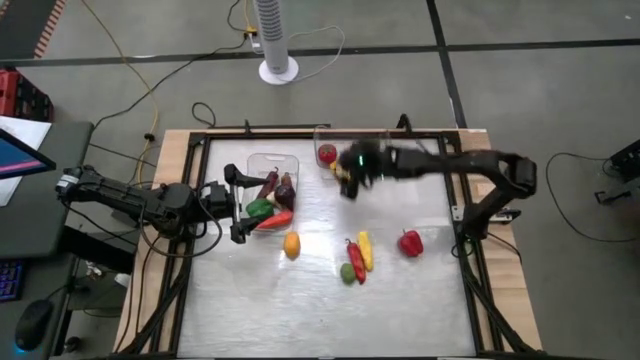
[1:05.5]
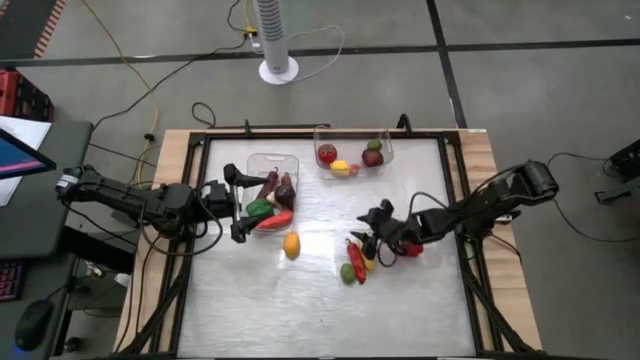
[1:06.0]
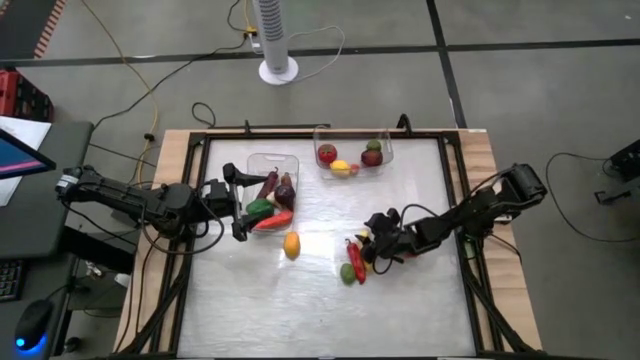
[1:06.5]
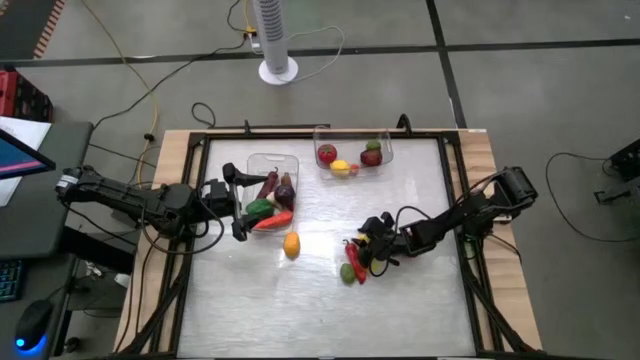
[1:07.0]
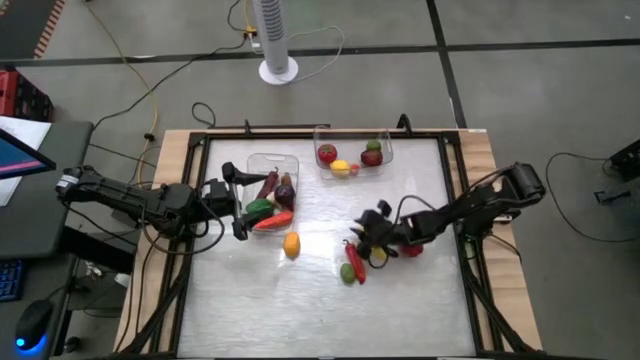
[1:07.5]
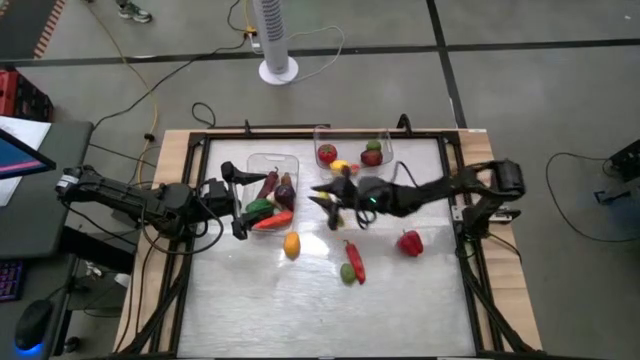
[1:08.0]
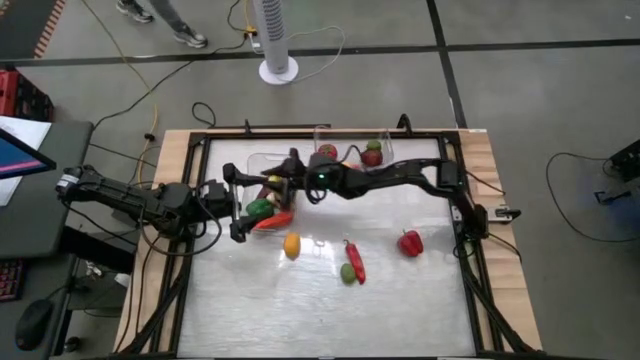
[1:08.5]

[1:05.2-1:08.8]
Task: Sort produce into baskets
Put the yellow corn into the left transparent bin

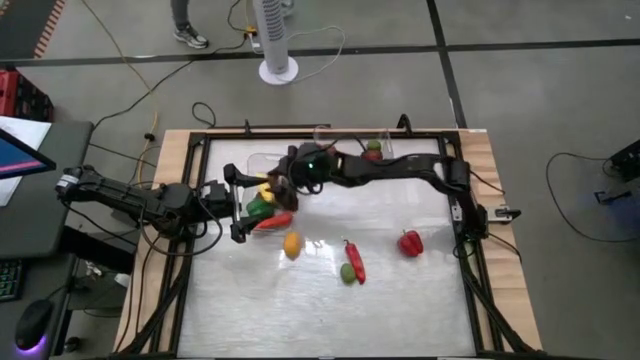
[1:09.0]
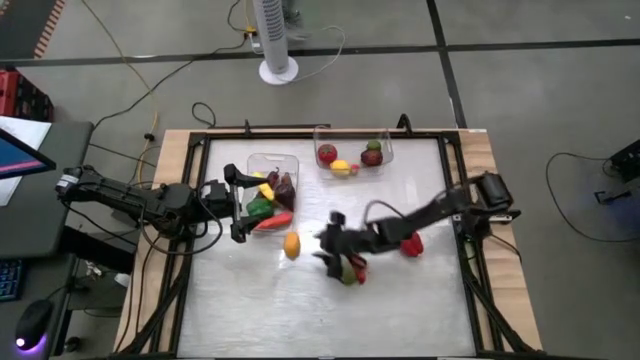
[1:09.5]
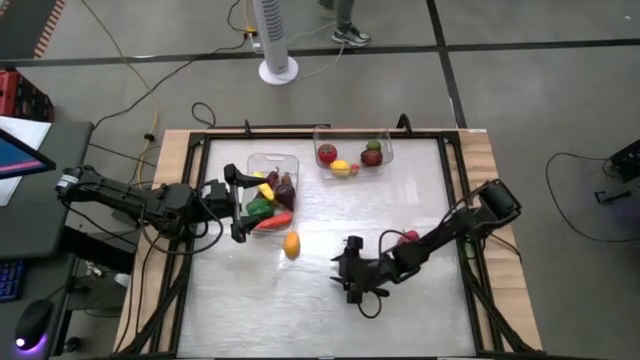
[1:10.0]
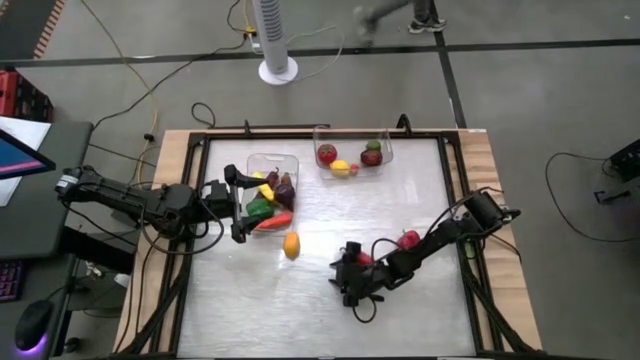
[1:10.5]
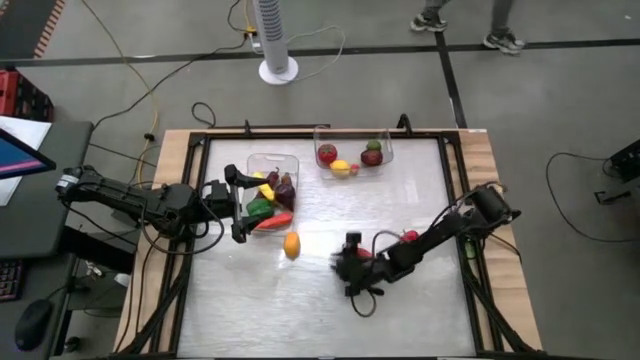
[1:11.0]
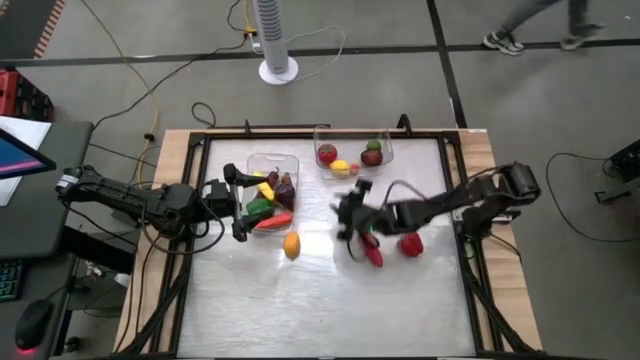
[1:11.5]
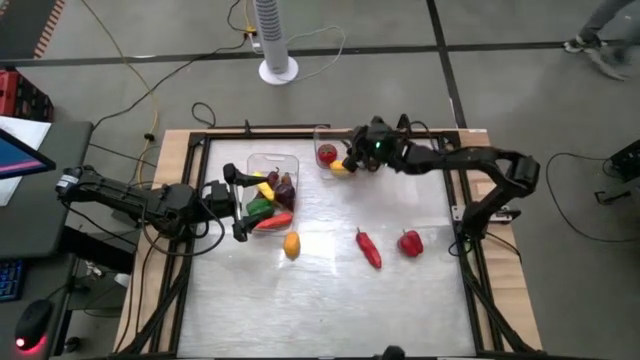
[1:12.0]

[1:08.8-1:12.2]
Put the green lime into the right transparent bin

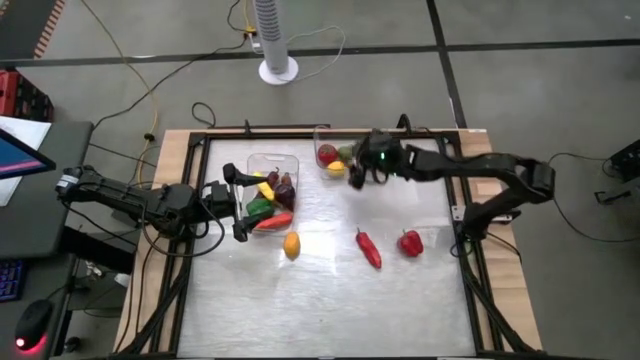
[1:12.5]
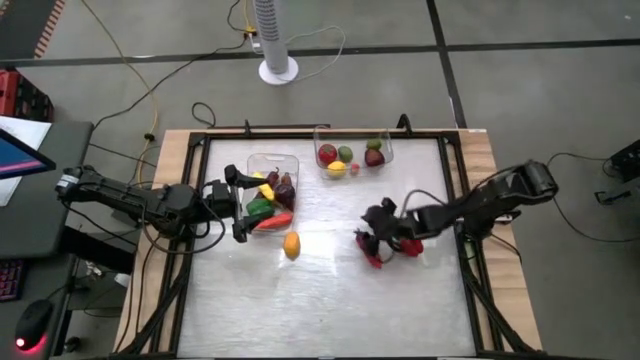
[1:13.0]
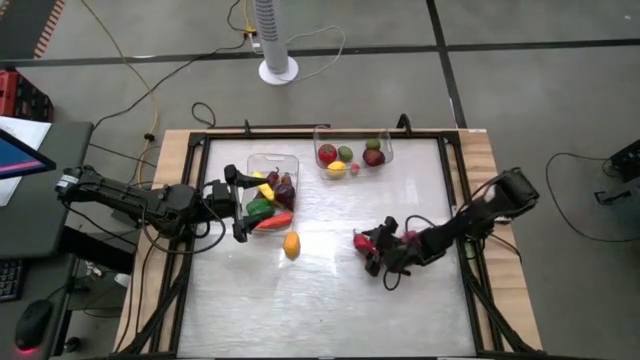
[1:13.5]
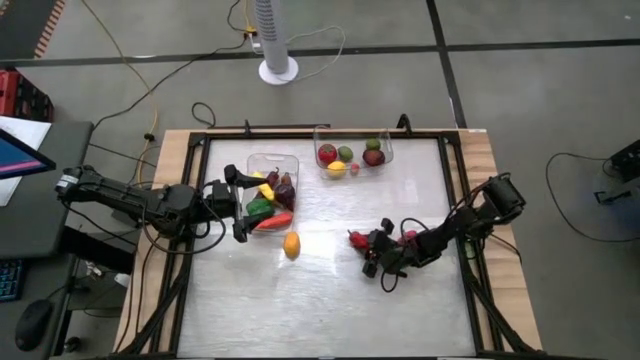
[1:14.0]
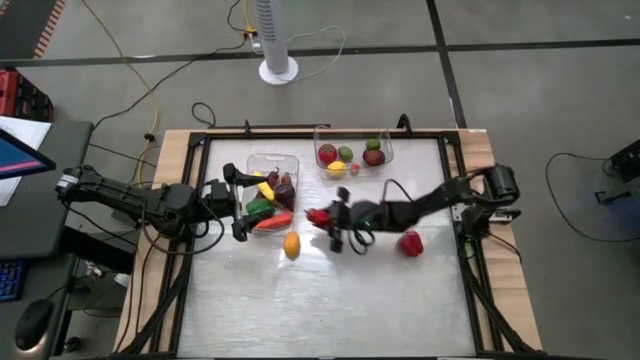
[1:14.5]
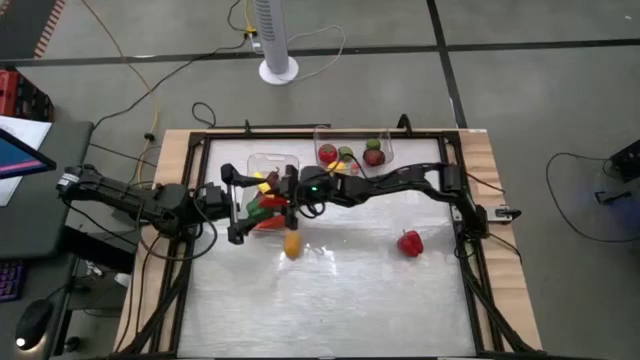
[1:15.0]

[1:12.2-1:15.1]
Put the red chili pepper into the left transparent bin

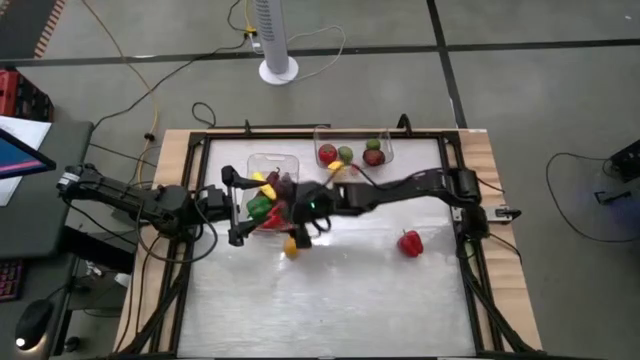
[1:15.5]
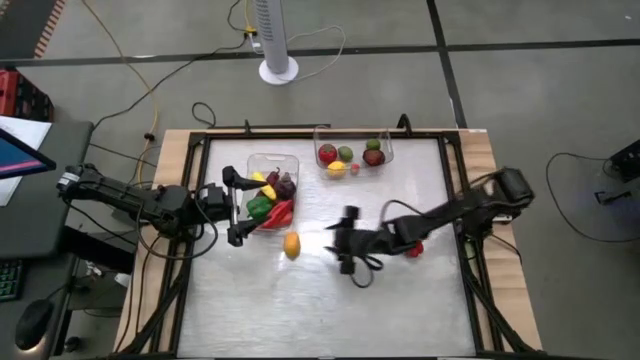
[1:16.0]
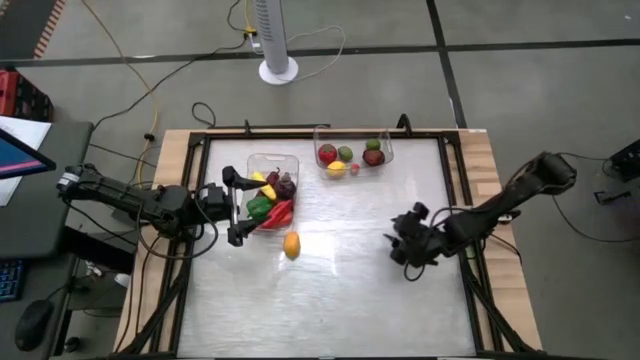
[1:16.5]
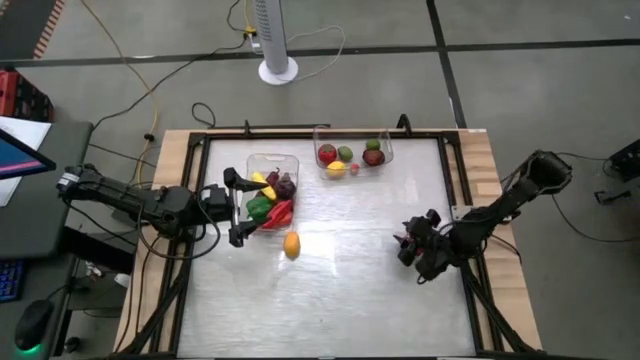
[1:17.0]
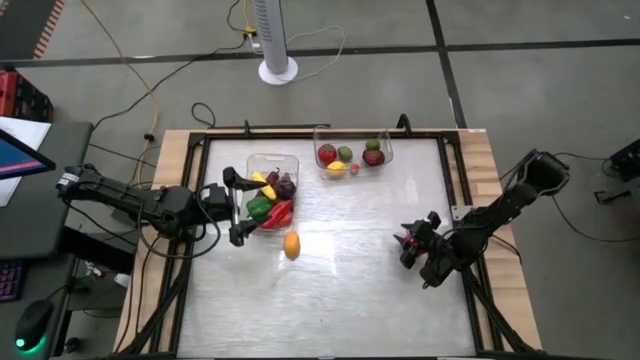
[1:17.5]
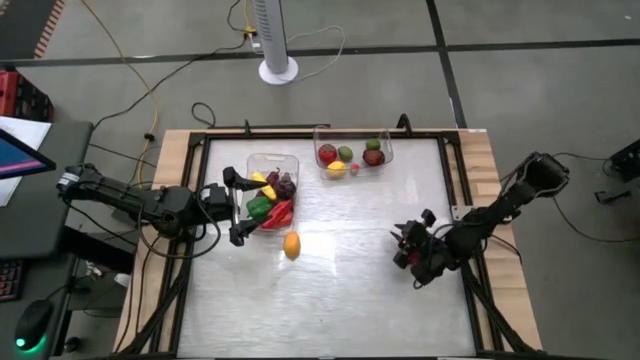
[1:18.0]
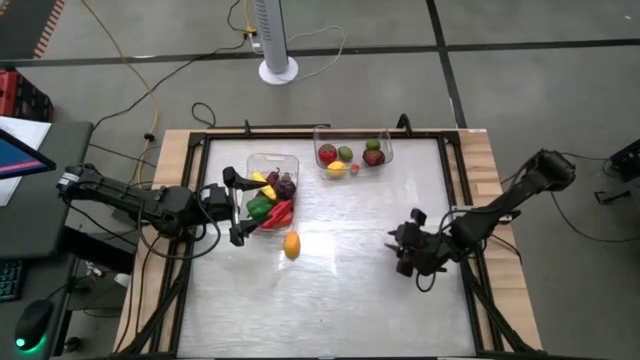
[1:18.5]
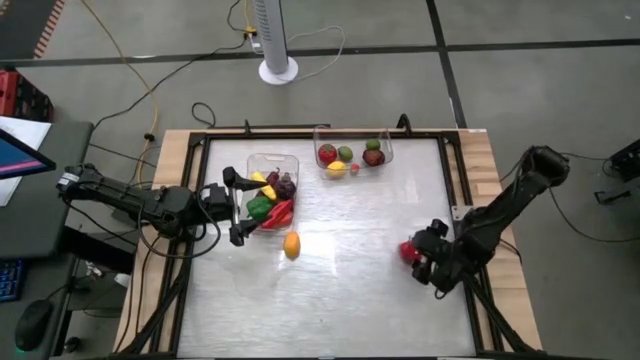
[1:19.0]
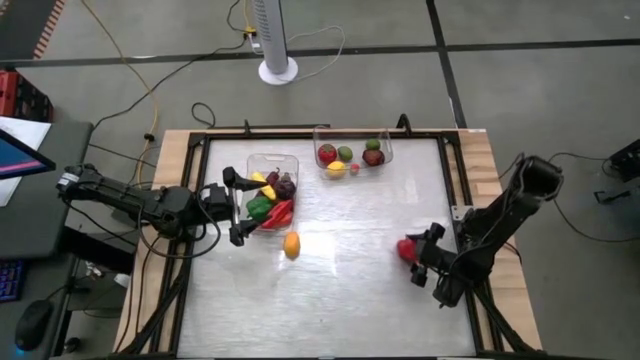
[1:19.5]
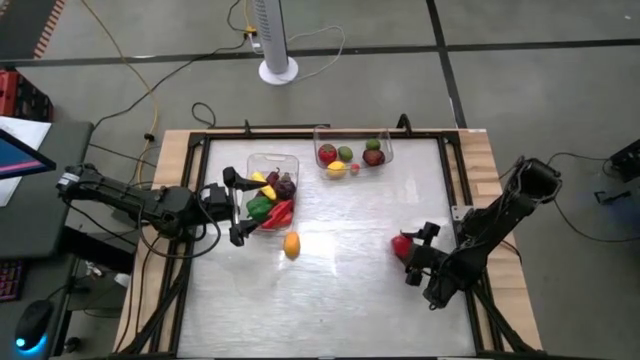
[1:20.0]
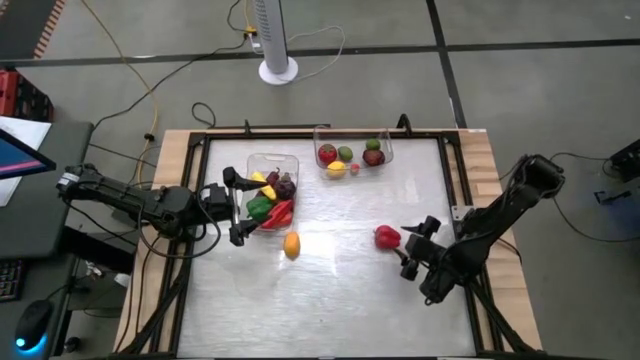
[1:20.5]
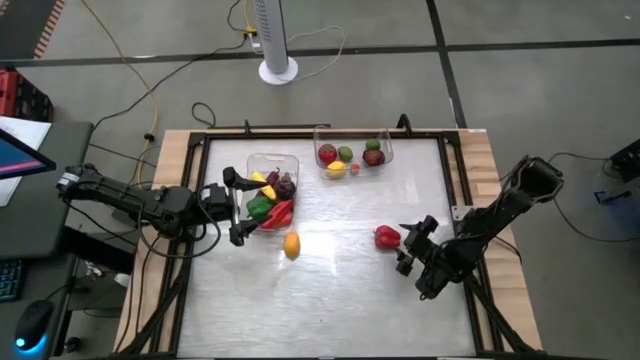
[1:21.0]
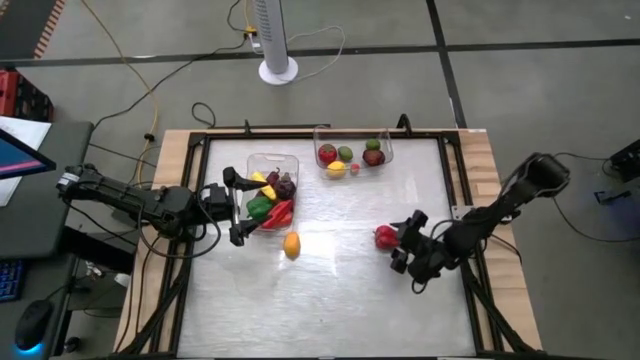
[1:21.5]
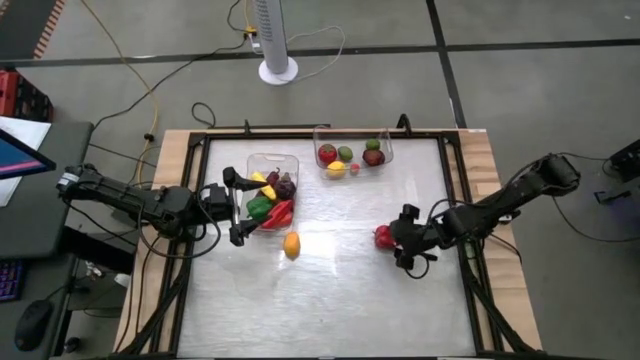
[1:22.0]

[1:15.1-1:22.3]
Put the red bell pepper into the left transparent bin

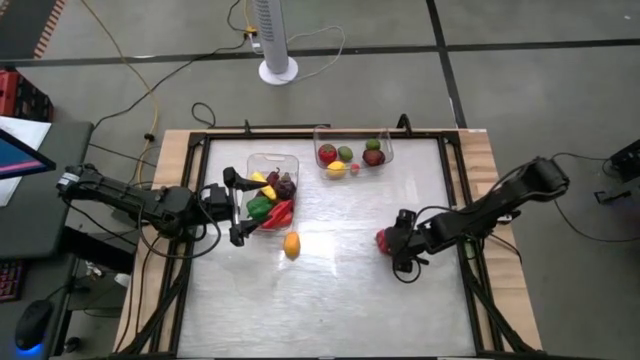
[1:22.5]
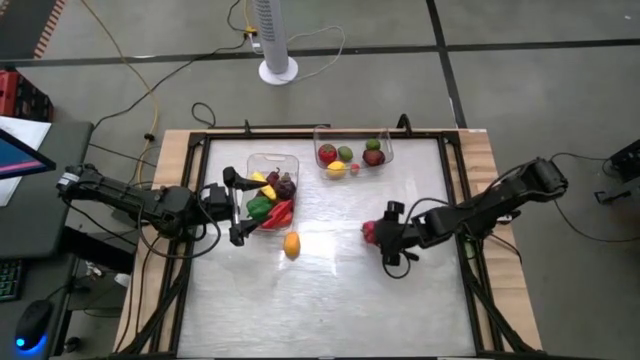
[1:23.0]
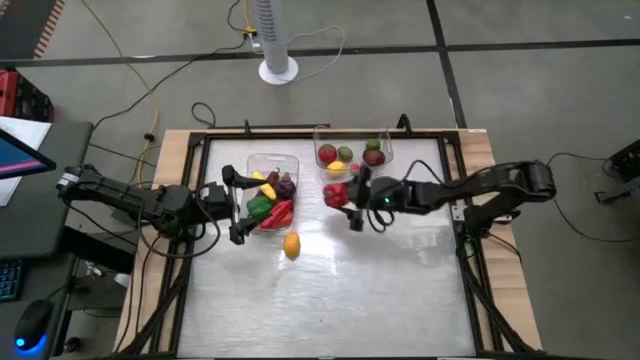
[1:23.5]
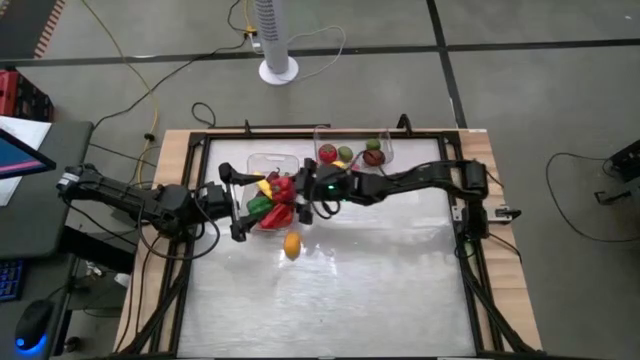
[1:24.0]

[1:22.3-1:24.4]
Put the red bell pepper into the left transparent bin

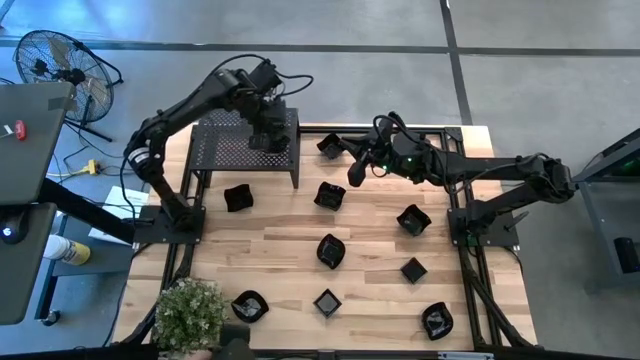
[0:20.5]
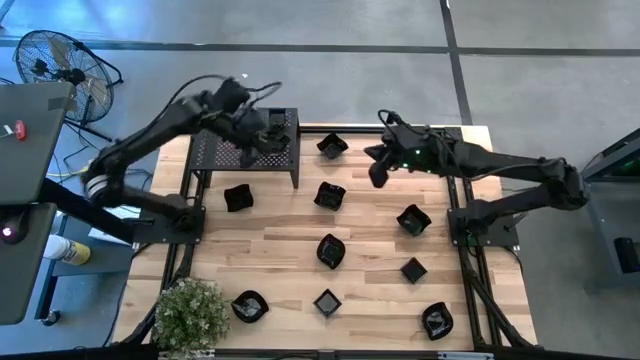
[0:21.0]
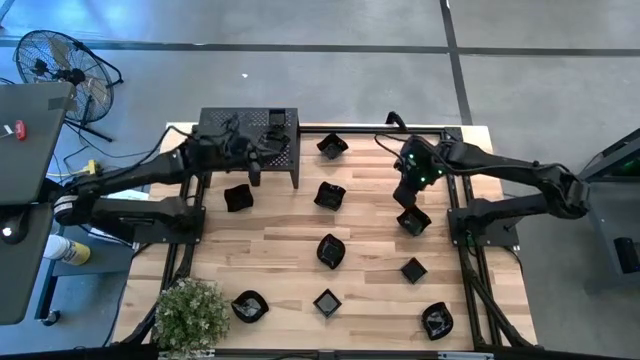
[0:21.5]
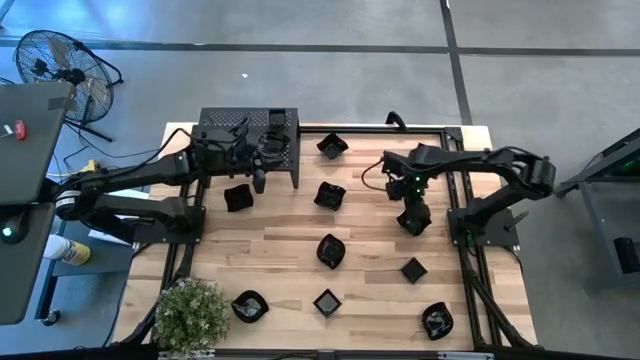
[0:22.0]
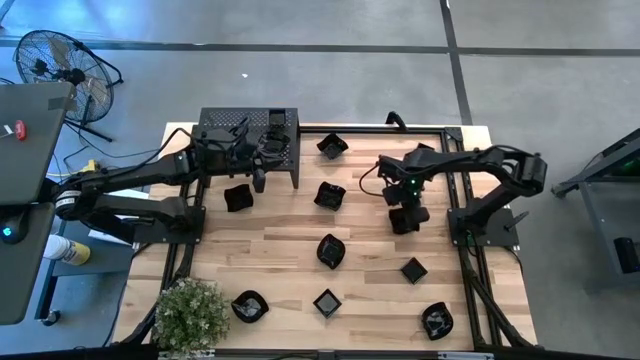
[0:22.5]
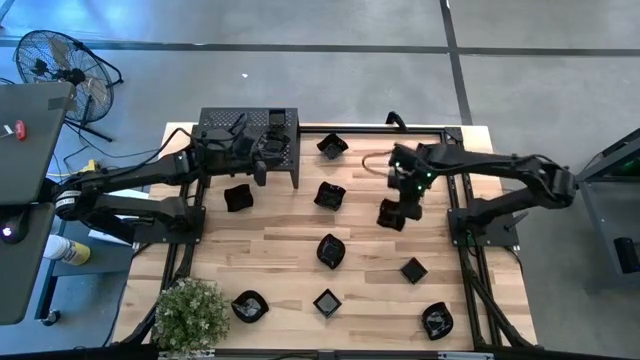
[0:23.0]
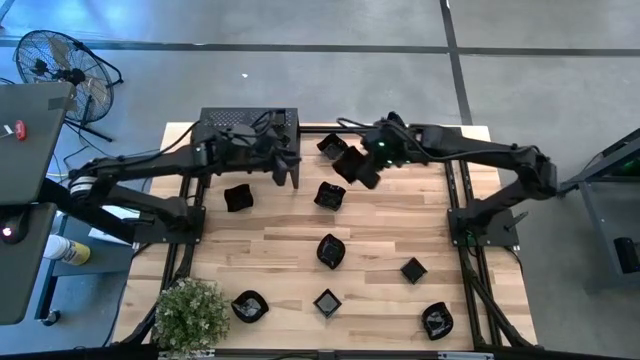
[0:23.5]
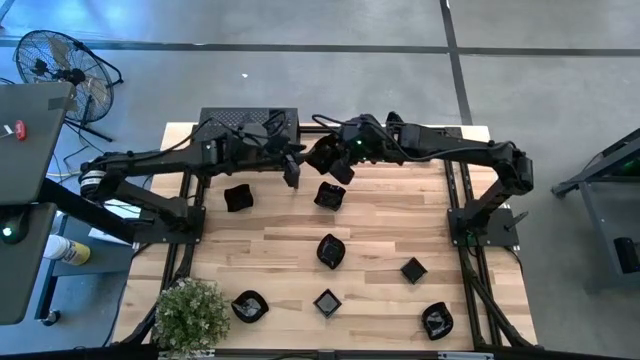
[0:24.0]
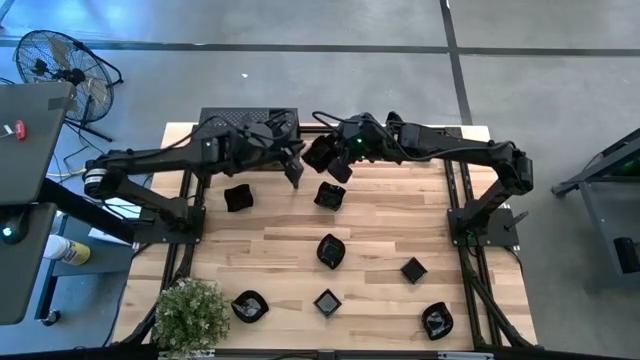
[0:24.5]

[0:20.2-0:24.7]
Task: Pick & Place Mini shaped plates
Put the distorted square plate on the shelf
